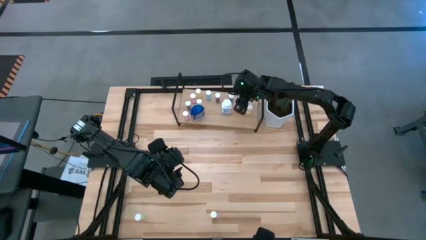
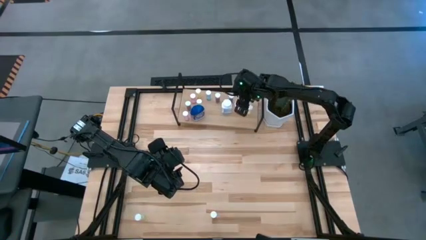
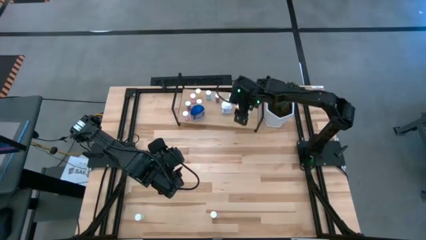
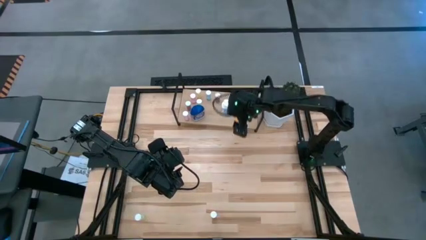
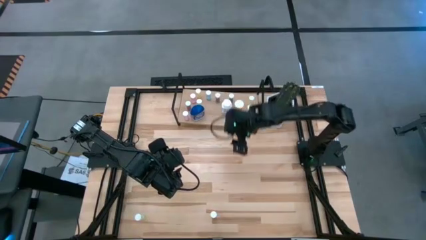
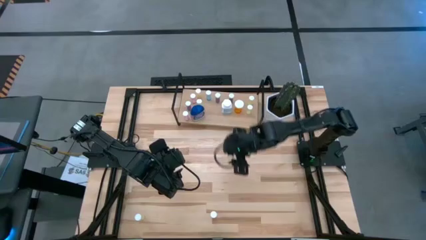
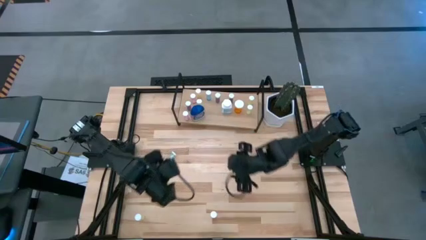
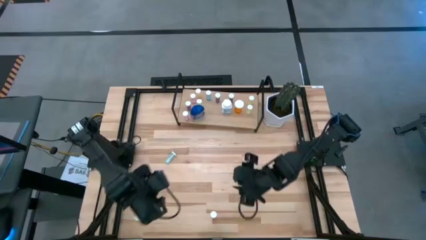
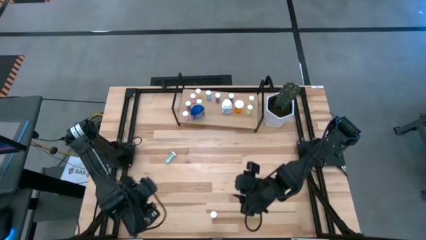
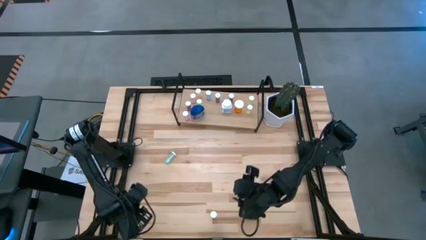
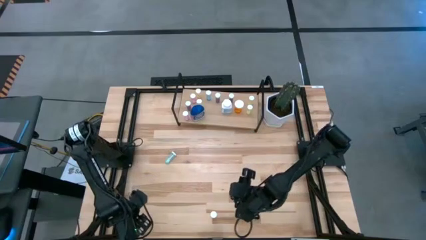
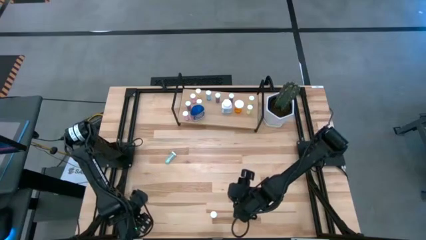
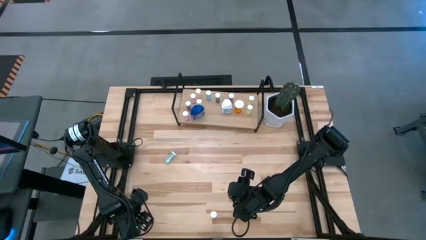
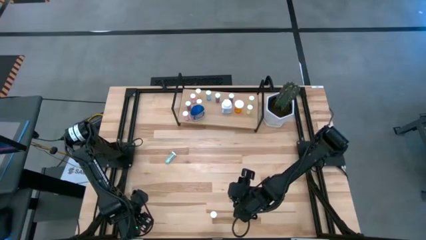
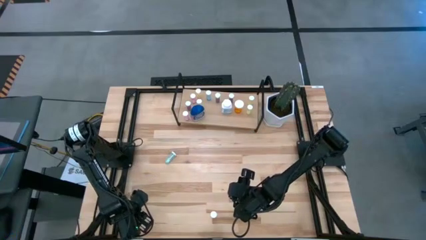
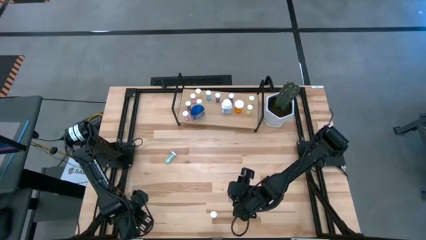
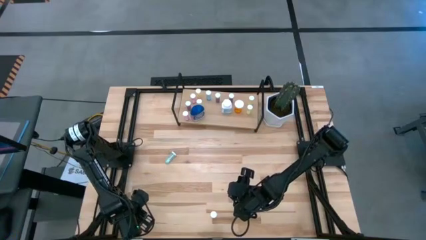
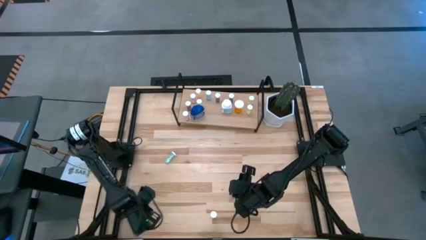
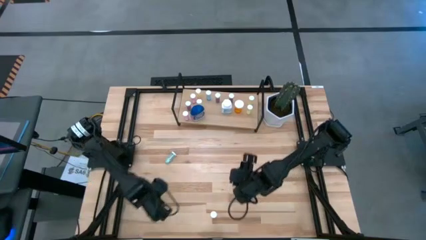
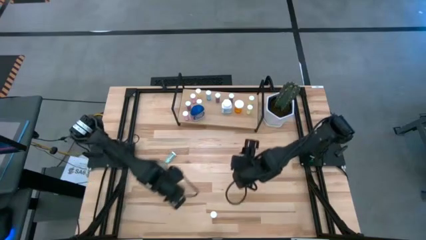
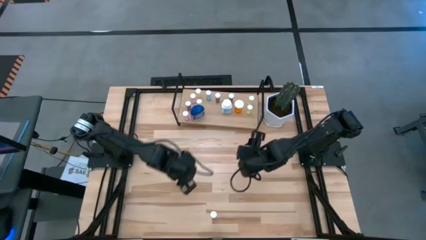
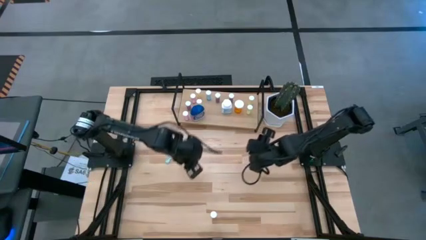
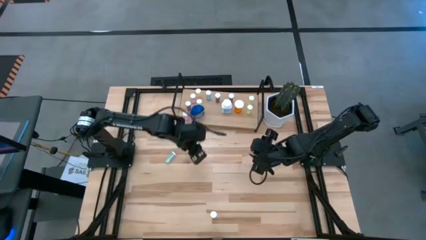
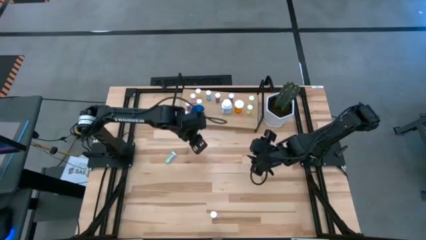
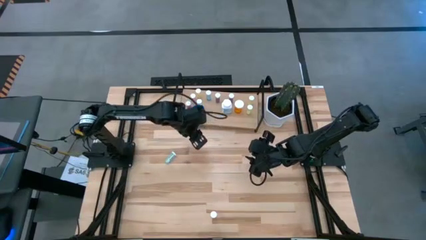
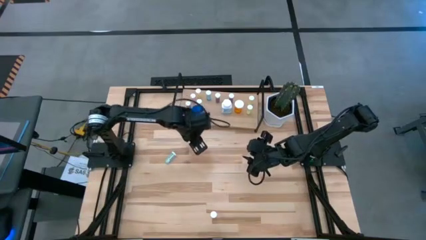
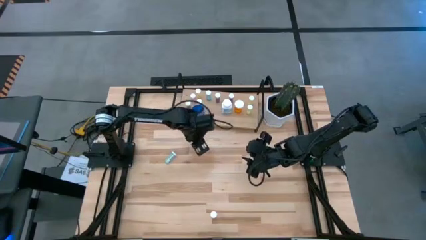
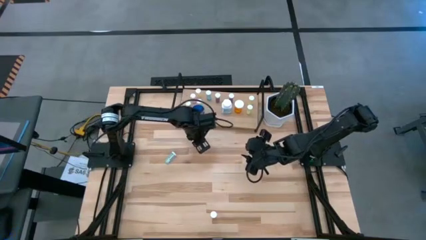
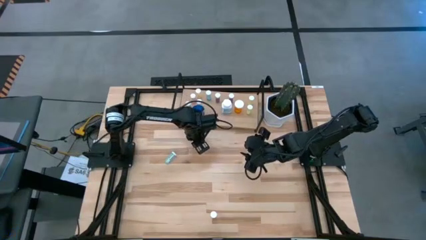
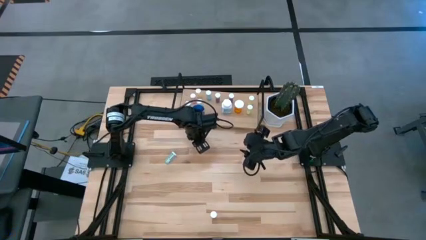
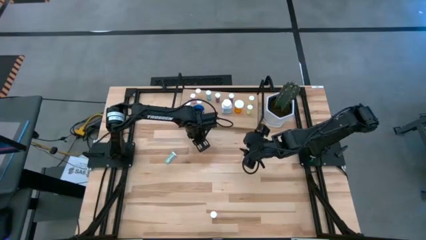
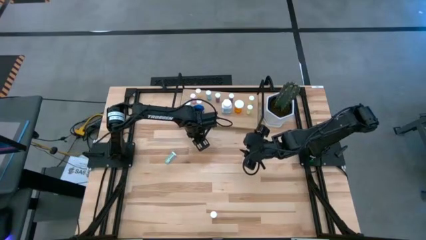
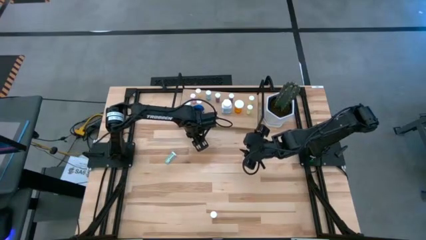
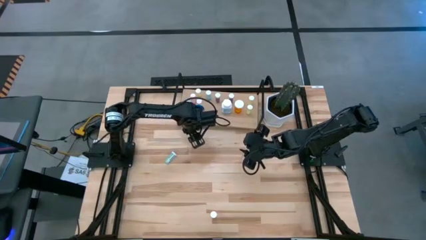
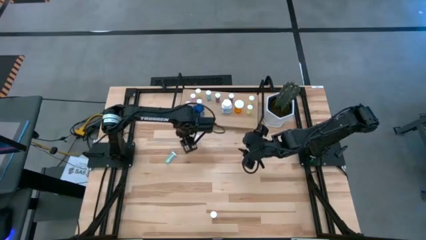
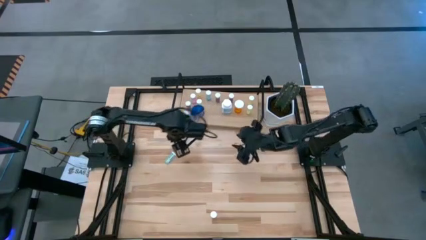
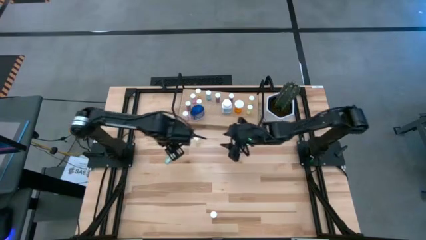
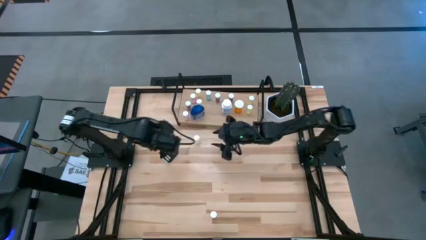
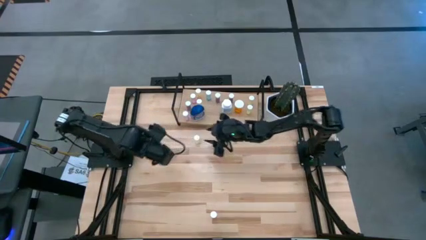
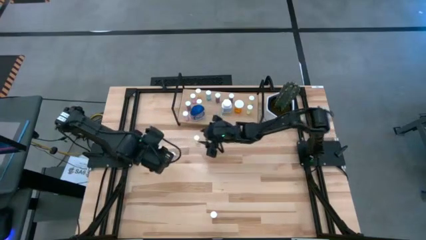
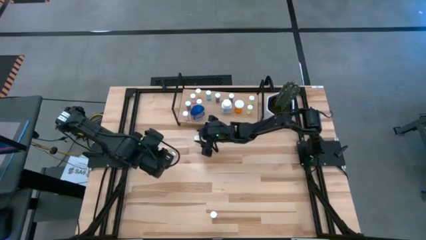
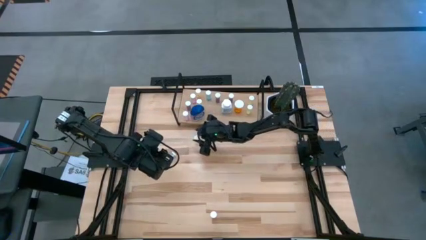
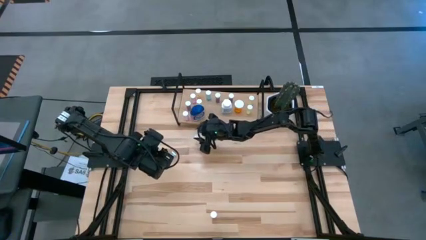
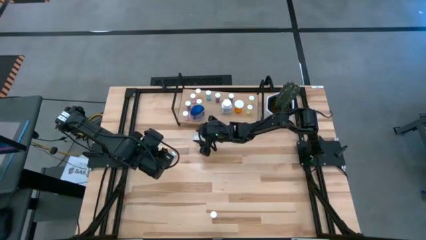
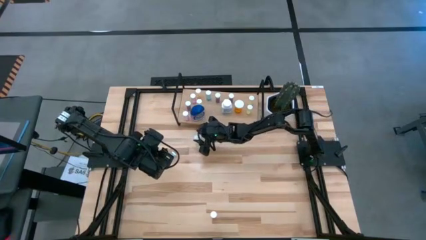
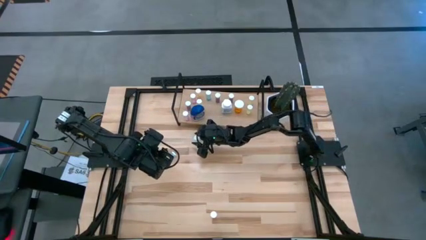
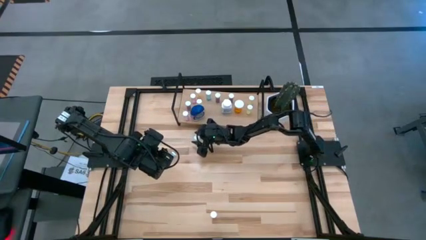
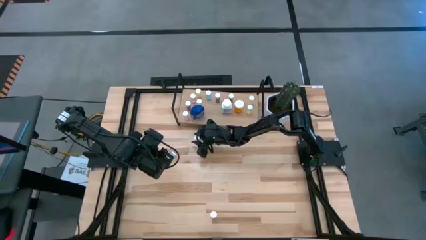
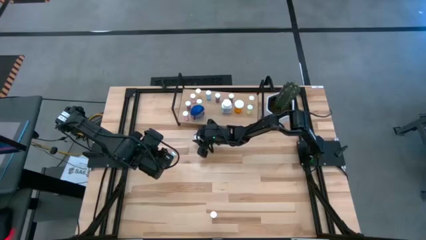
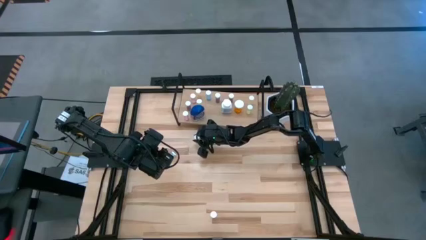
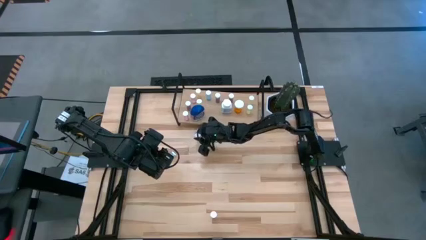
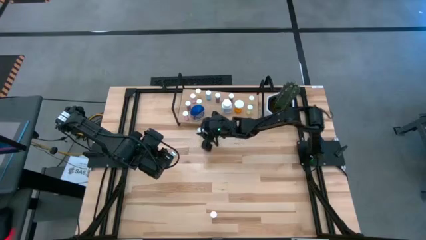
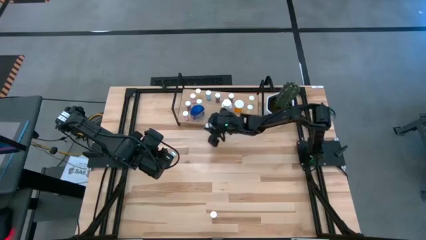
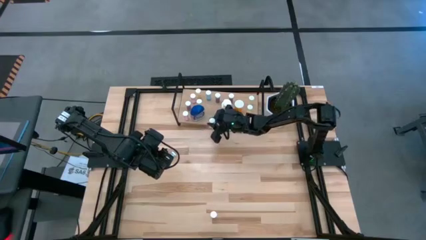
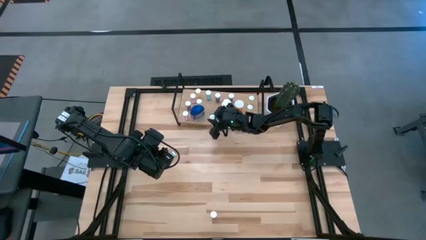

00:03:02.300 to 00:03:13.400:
Task: Pick and place medicine bottles onto shelf by color
Put the yellow pill bottle on the shelf
